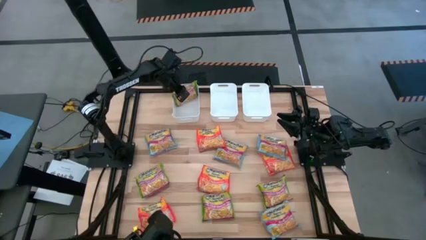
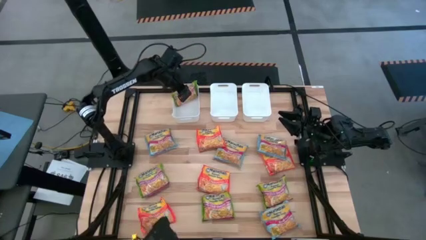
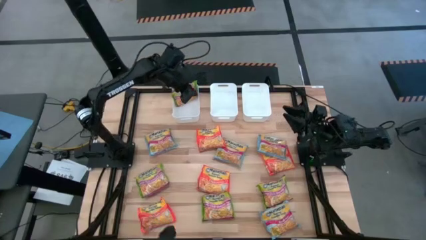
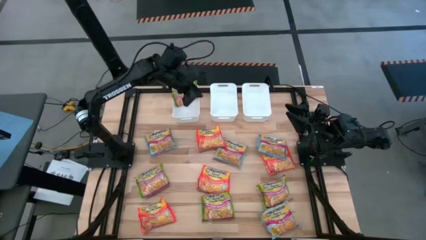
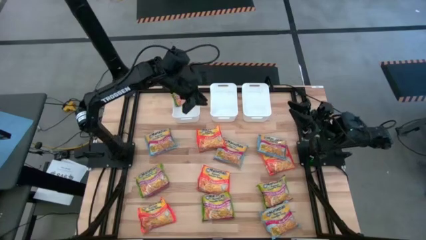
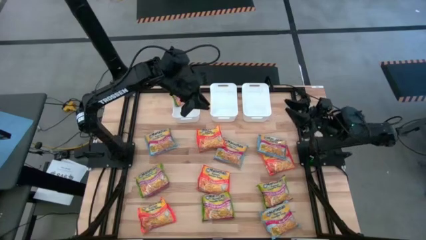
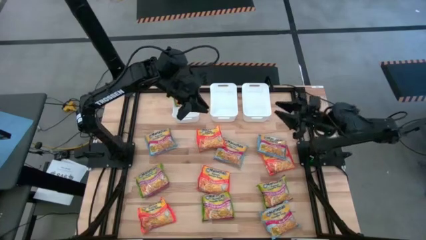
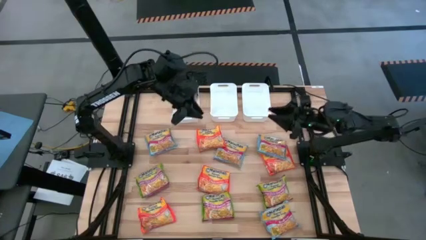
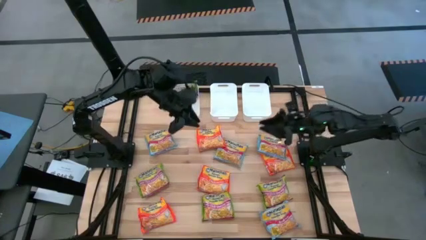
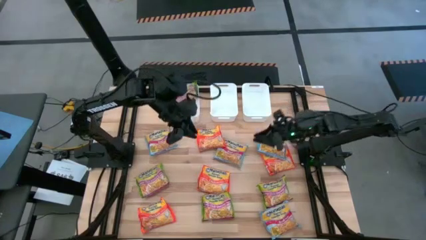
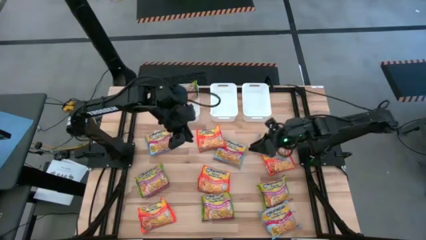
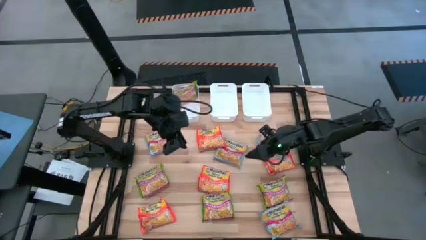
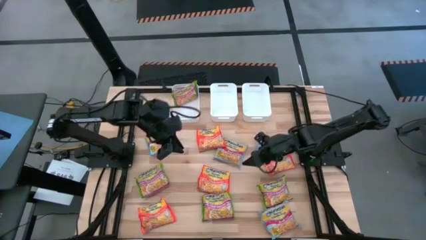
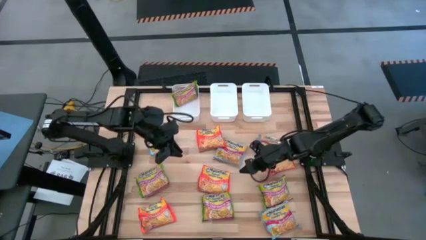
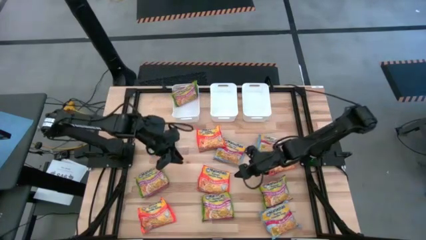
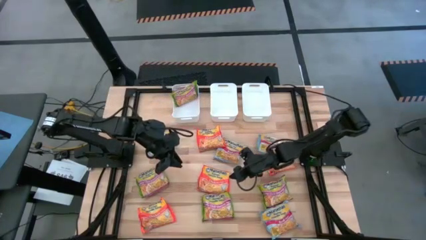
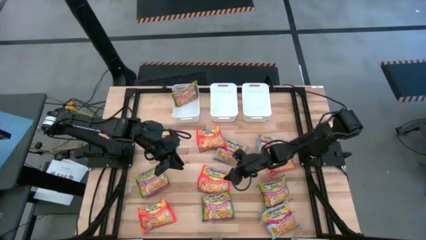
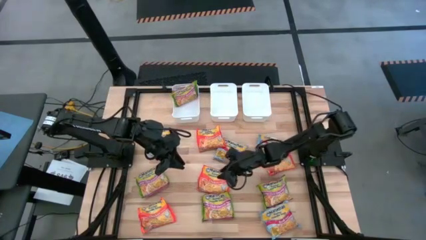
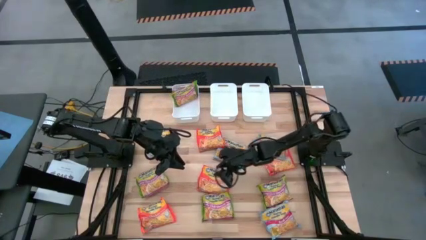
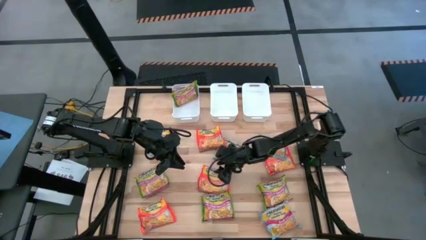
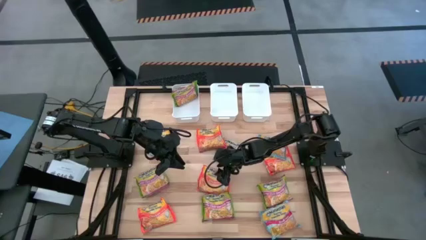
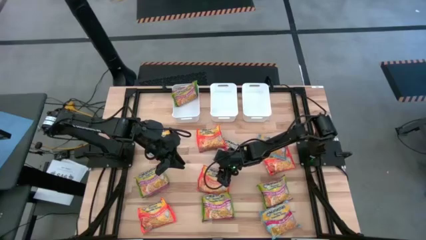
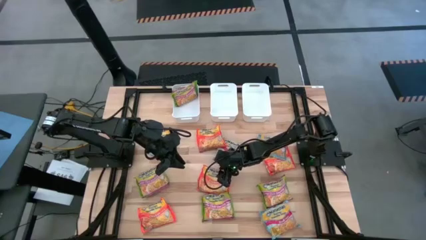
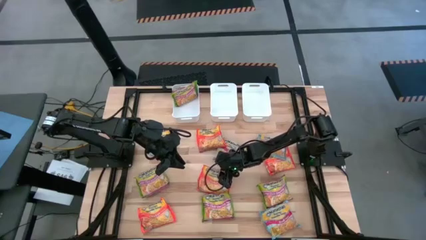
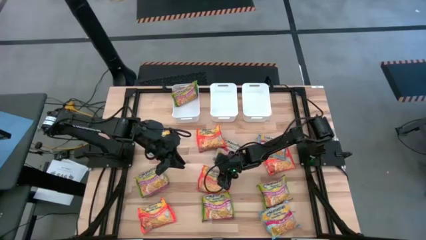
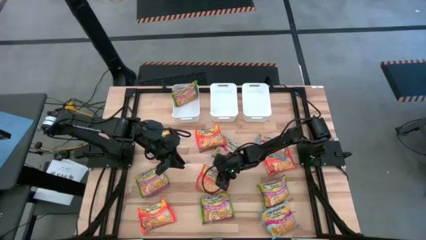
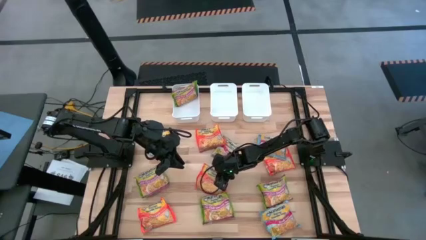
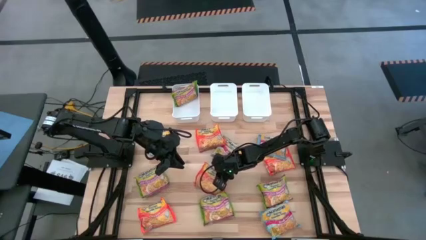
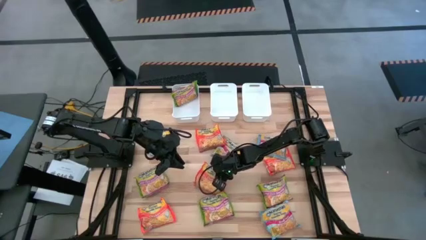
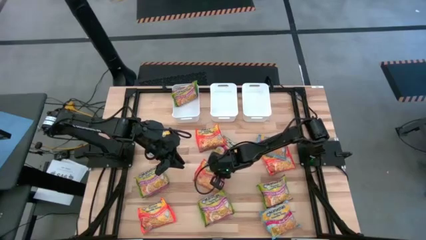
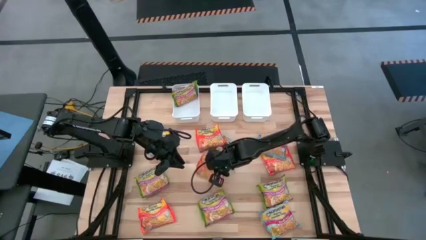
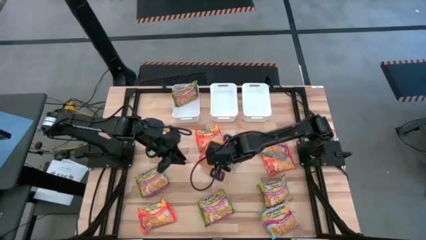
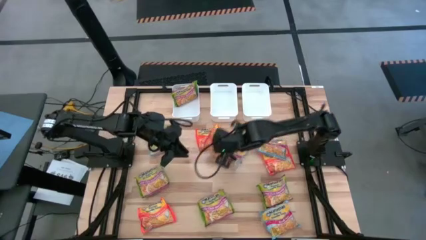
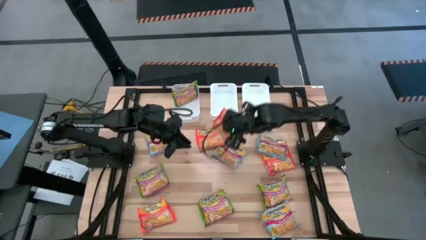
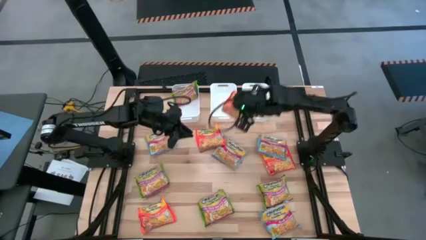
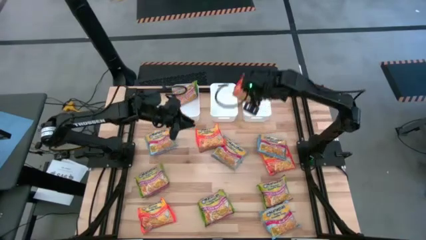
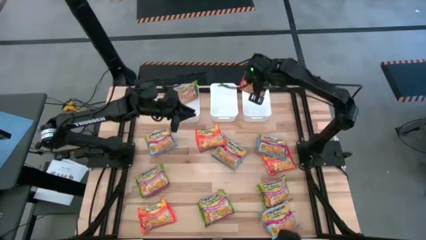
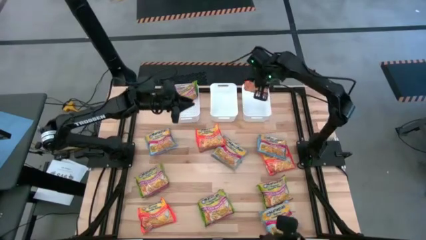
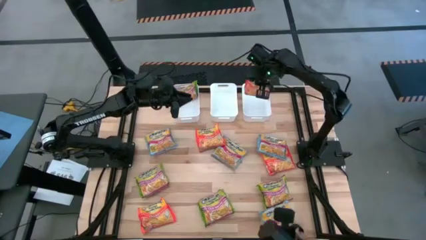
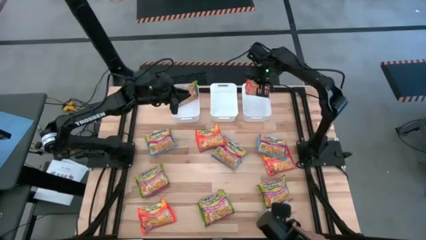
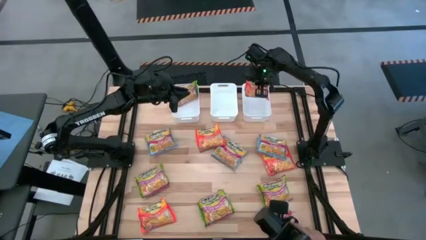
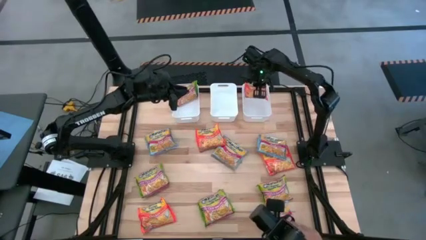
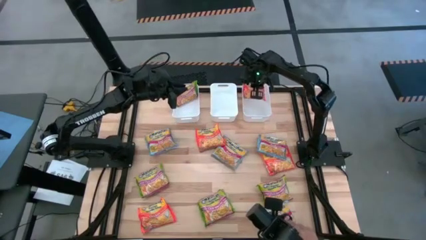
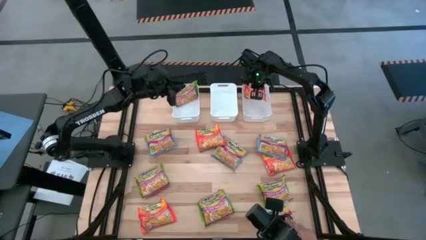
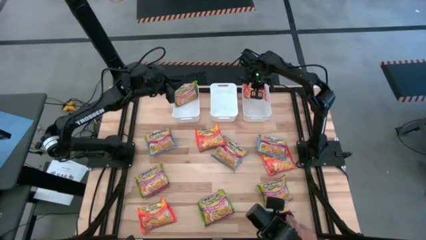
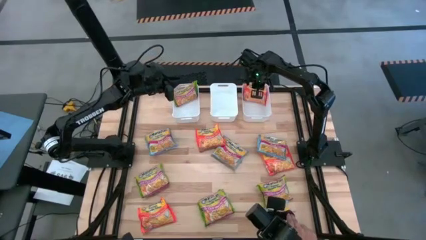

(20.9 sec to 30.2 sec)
Task: Sort Maruchan noodles
Put the orange noodle pack into the right white bin

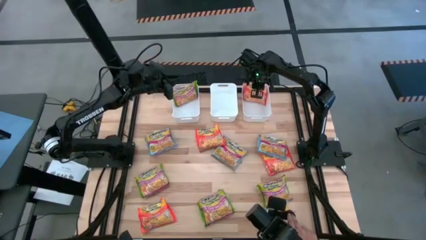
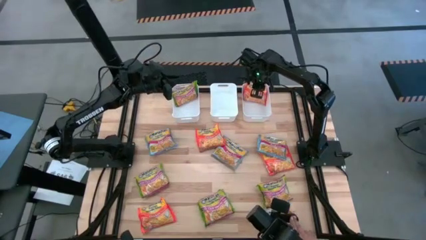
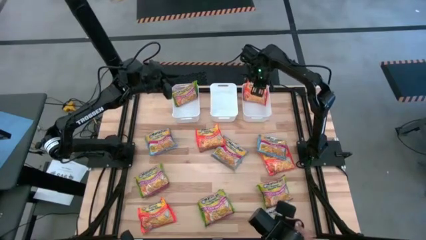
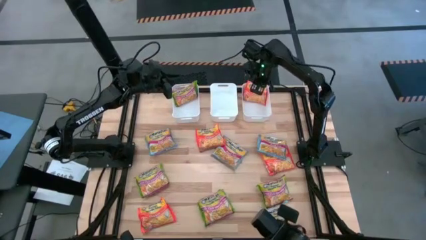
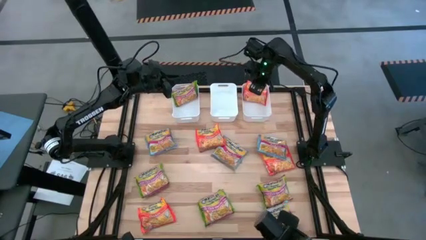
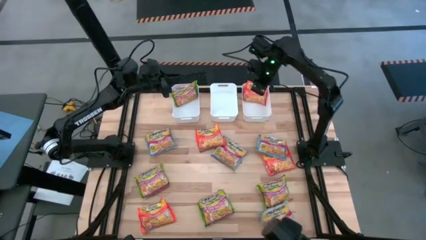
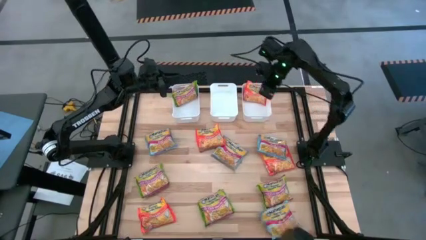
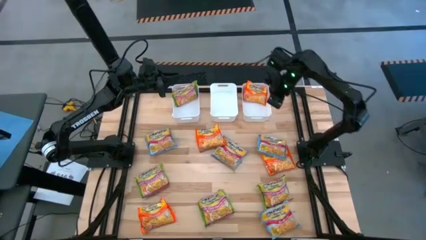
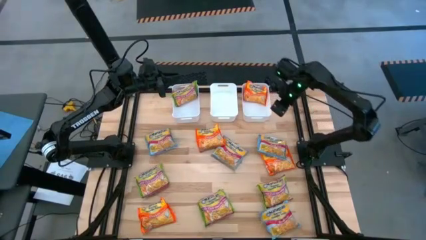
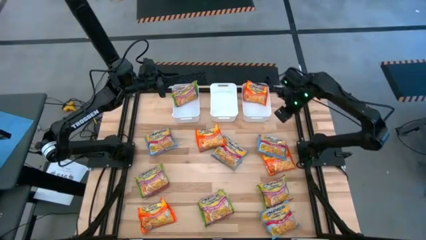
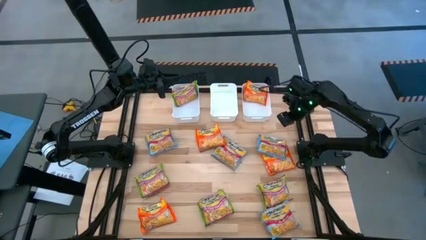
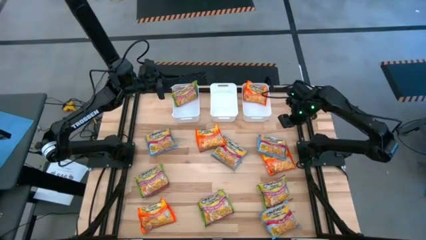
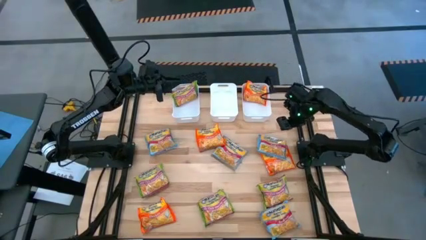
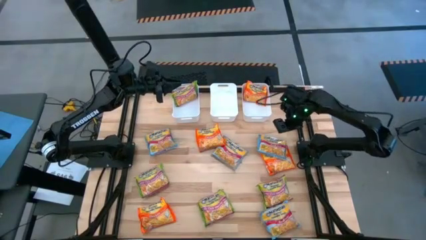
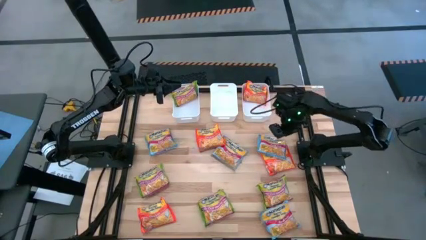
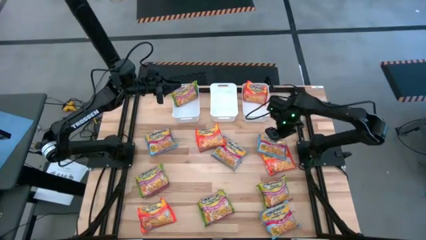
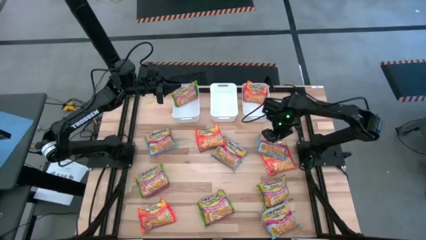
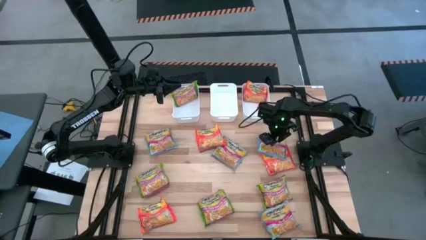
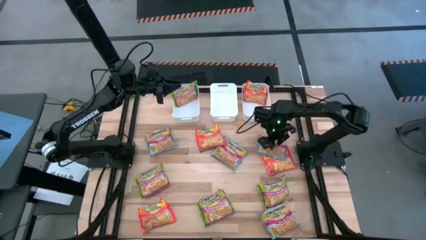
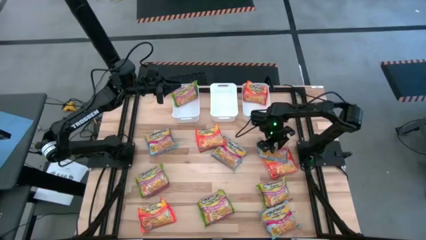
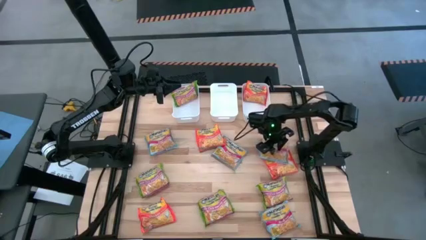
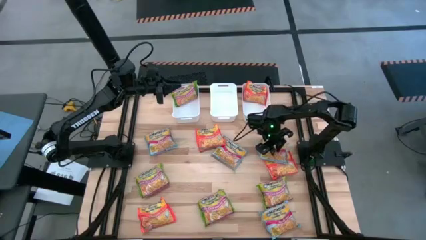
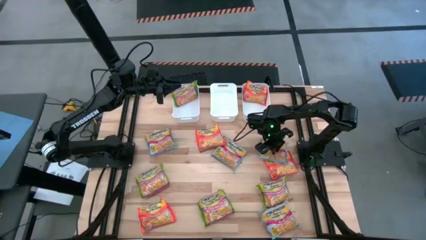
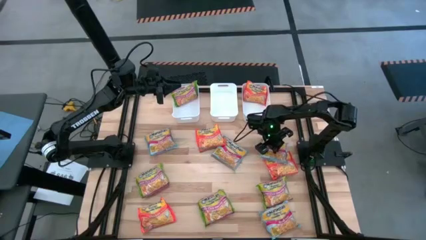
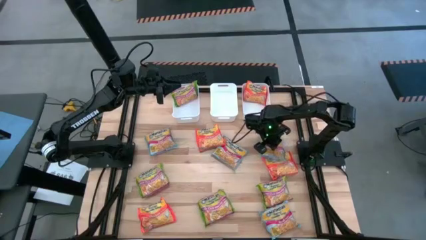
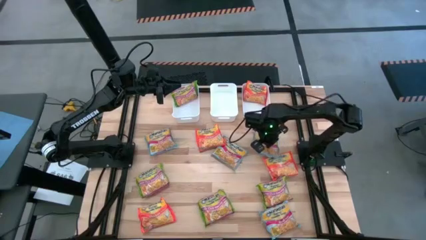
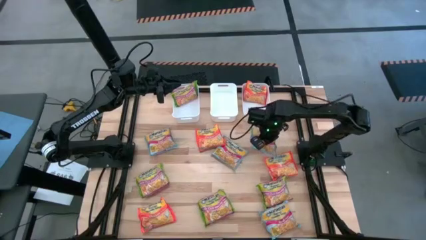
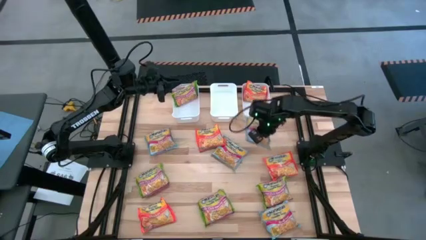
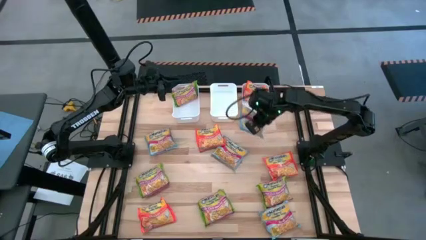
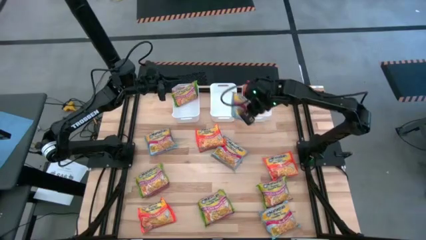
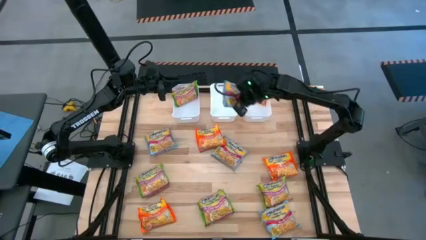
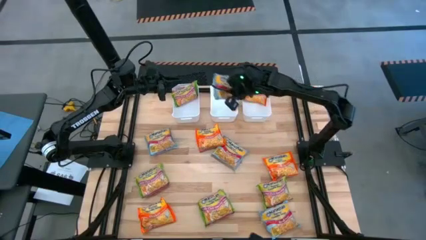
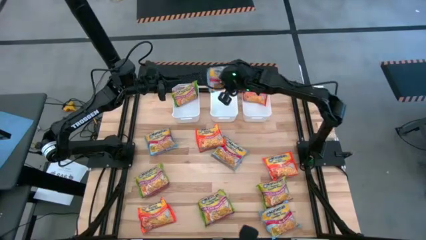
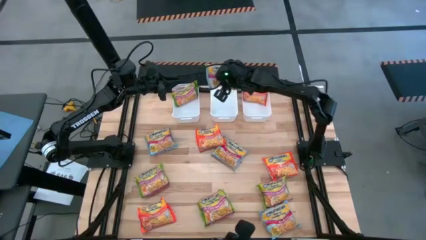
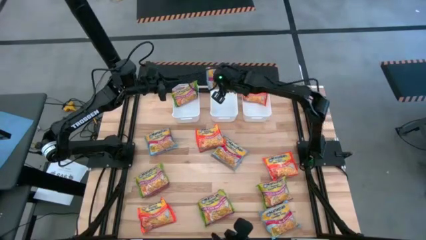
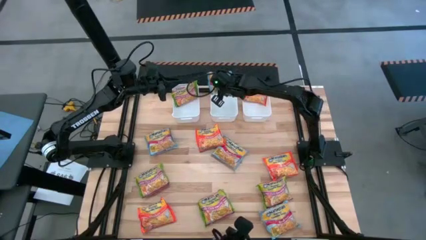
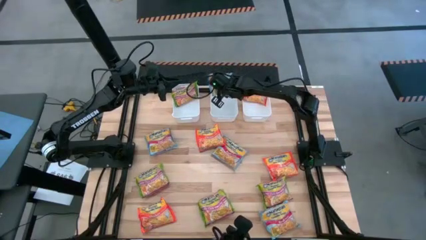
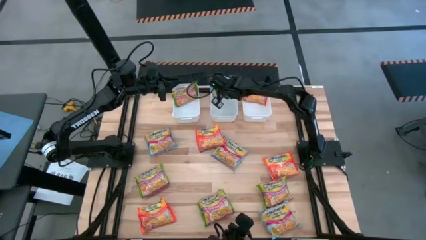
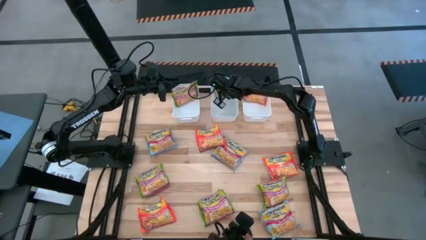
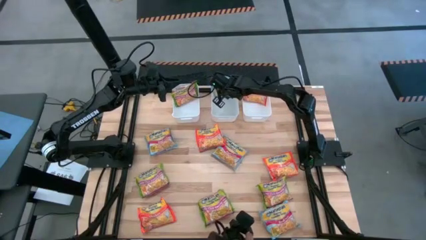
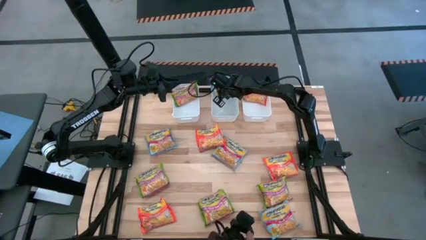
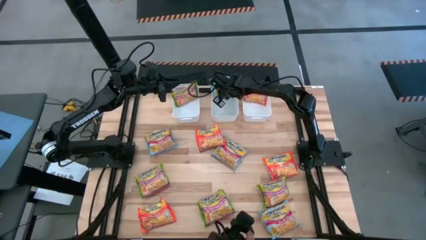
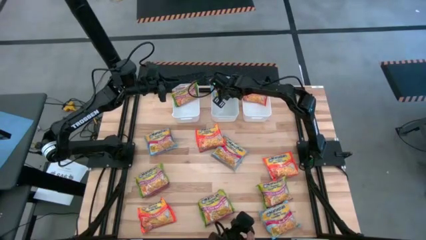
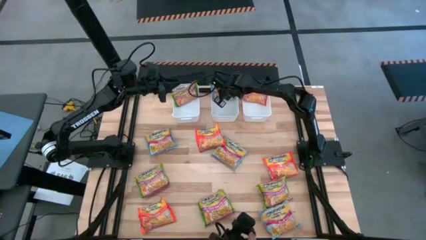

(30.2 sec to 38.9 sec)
Put the blue noodle pack into the middle white bin
